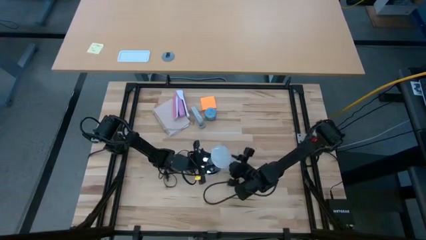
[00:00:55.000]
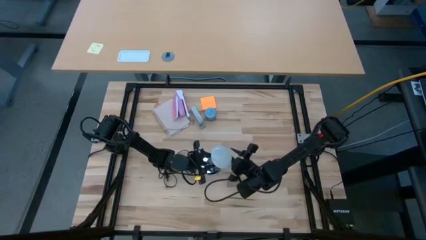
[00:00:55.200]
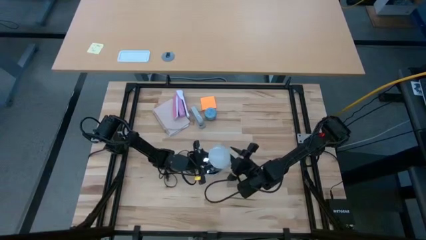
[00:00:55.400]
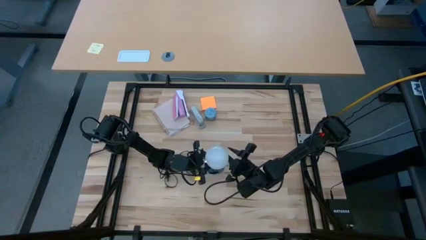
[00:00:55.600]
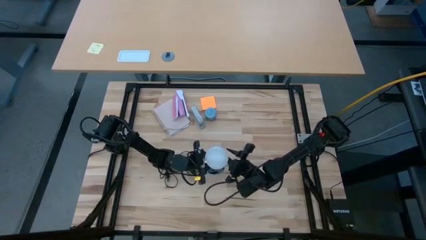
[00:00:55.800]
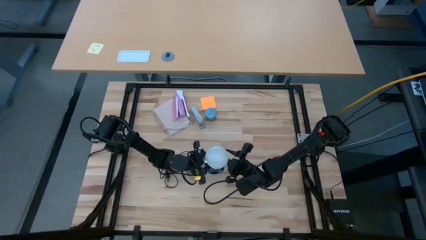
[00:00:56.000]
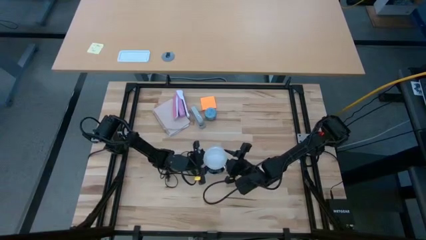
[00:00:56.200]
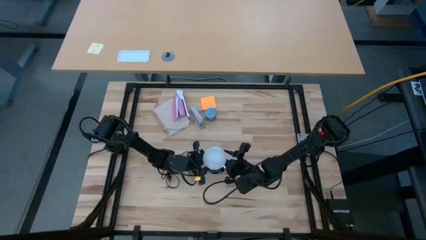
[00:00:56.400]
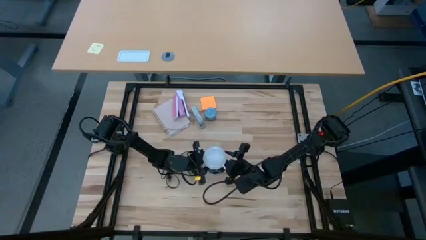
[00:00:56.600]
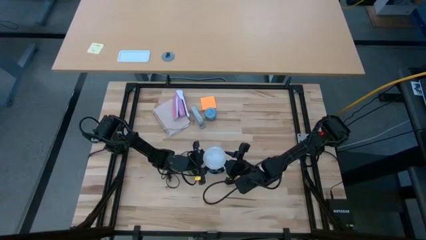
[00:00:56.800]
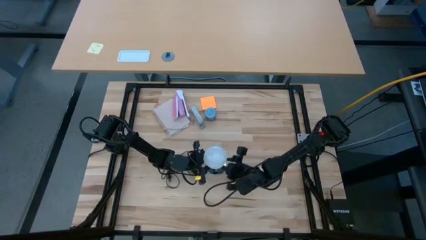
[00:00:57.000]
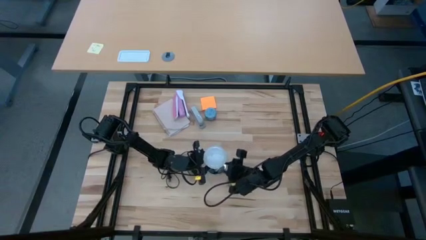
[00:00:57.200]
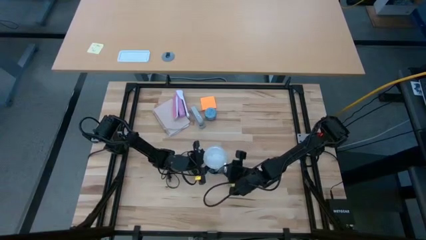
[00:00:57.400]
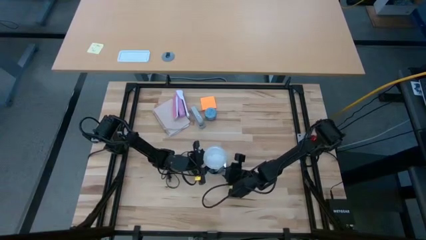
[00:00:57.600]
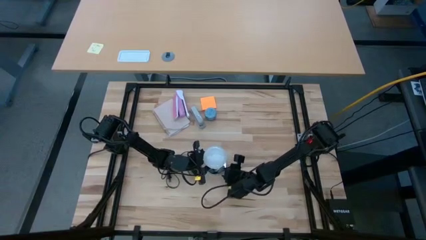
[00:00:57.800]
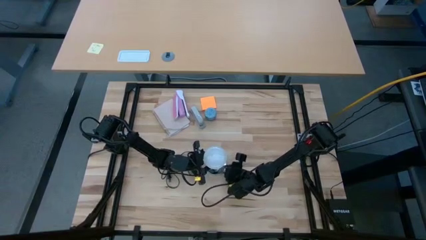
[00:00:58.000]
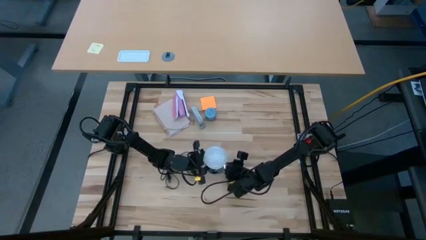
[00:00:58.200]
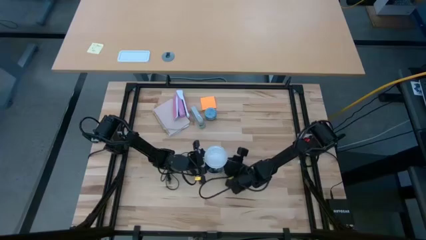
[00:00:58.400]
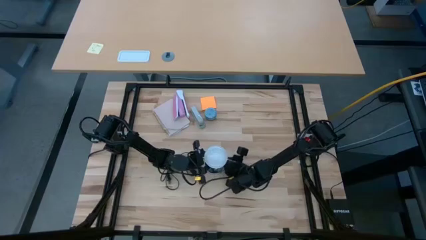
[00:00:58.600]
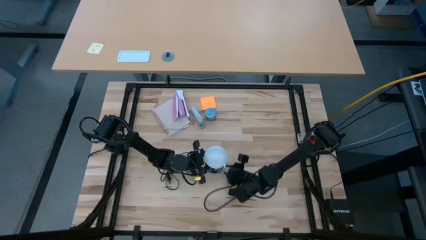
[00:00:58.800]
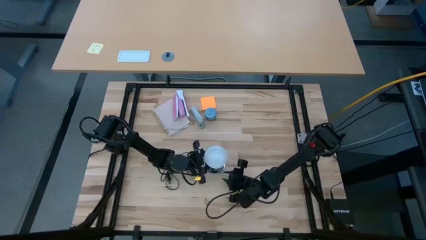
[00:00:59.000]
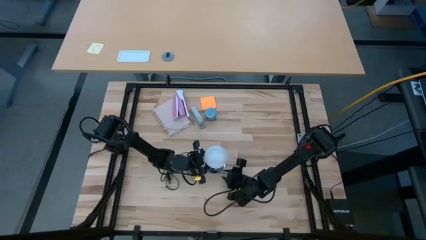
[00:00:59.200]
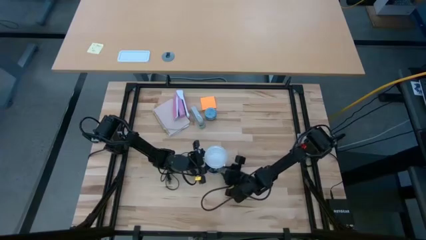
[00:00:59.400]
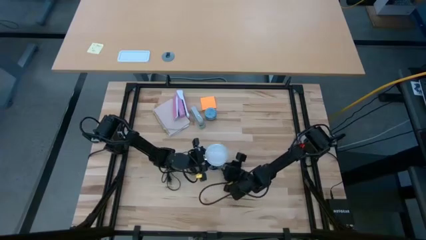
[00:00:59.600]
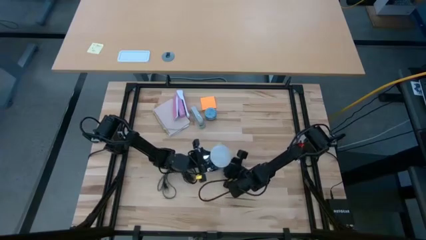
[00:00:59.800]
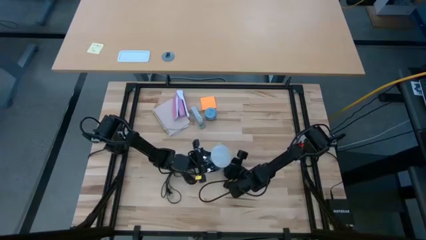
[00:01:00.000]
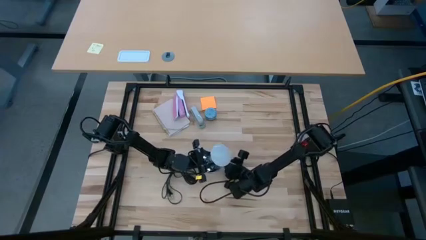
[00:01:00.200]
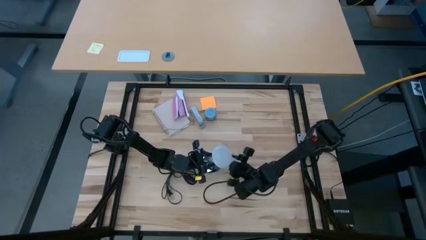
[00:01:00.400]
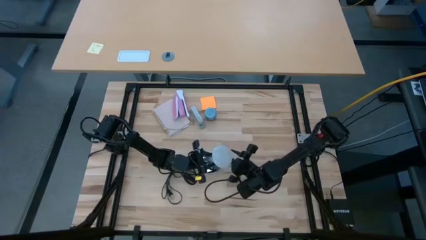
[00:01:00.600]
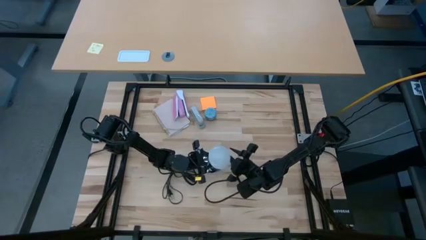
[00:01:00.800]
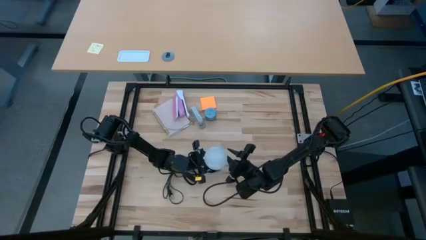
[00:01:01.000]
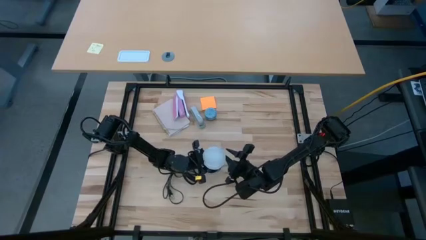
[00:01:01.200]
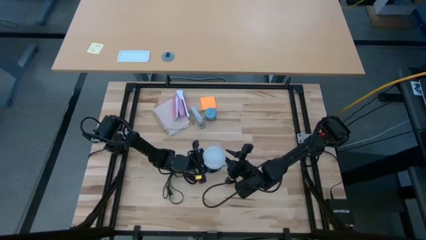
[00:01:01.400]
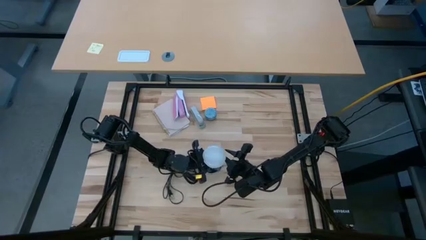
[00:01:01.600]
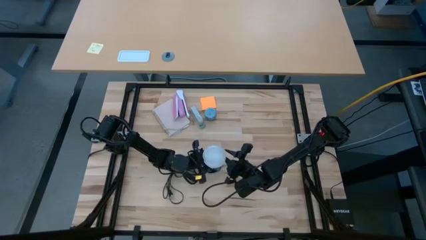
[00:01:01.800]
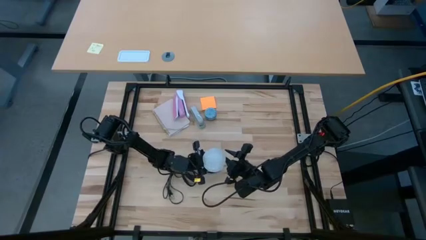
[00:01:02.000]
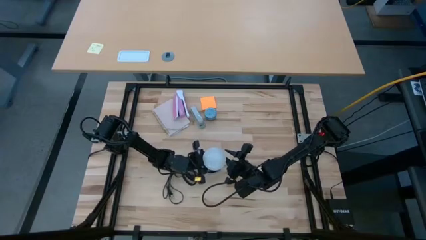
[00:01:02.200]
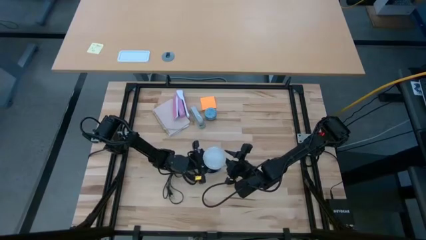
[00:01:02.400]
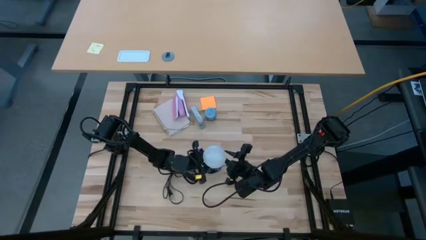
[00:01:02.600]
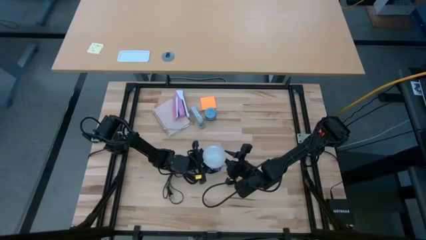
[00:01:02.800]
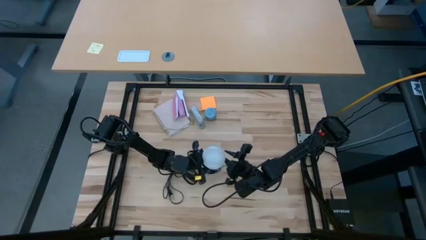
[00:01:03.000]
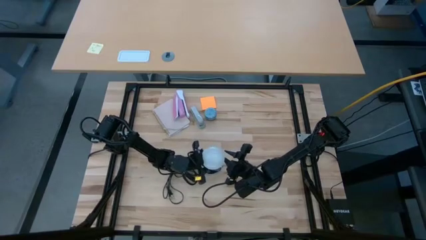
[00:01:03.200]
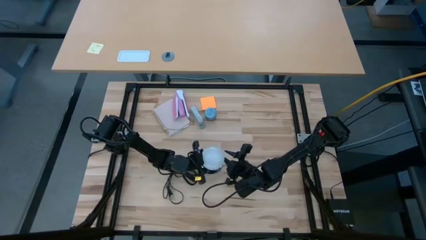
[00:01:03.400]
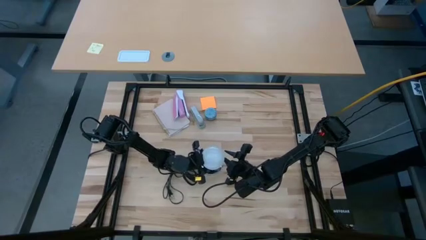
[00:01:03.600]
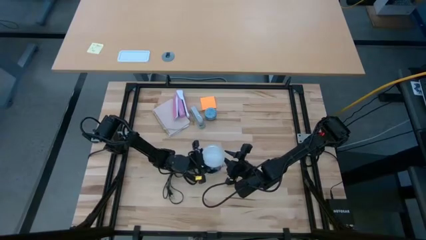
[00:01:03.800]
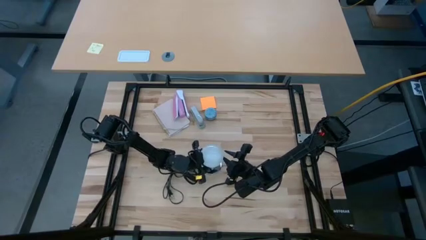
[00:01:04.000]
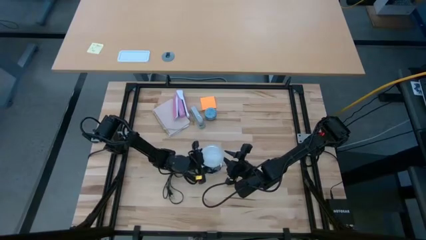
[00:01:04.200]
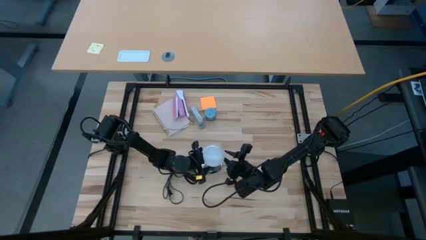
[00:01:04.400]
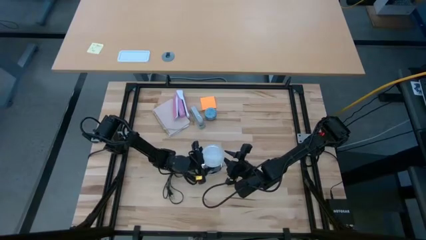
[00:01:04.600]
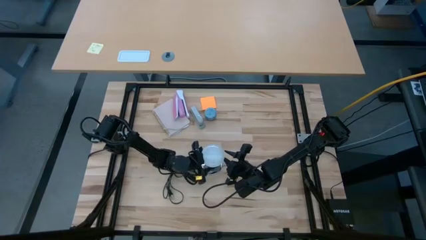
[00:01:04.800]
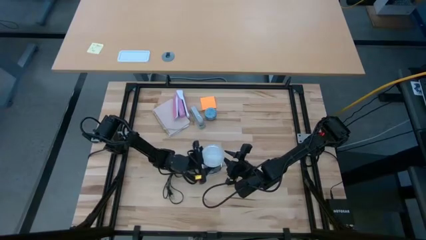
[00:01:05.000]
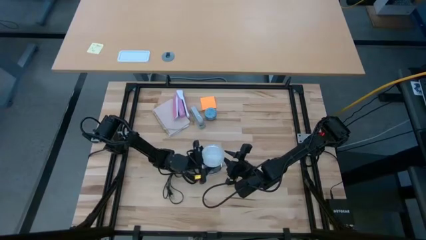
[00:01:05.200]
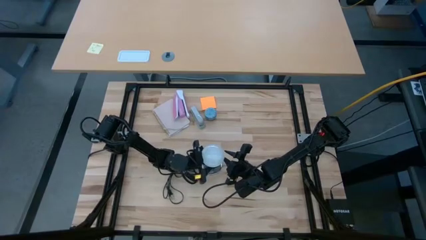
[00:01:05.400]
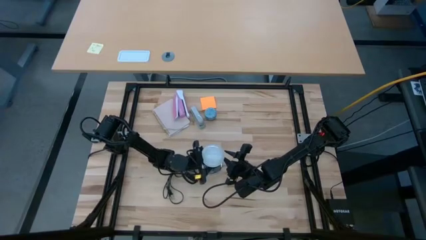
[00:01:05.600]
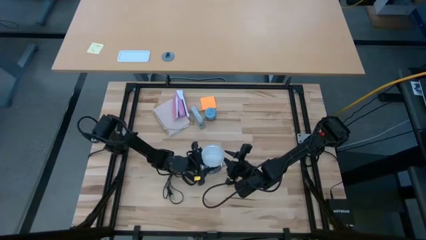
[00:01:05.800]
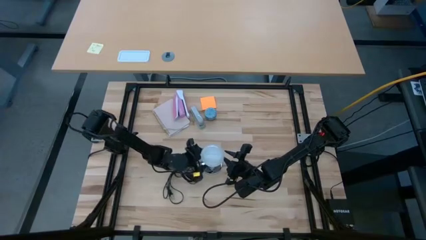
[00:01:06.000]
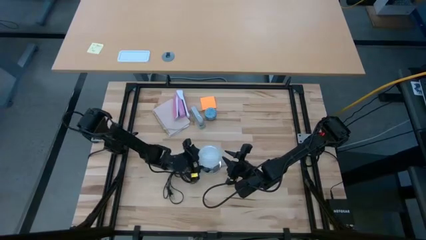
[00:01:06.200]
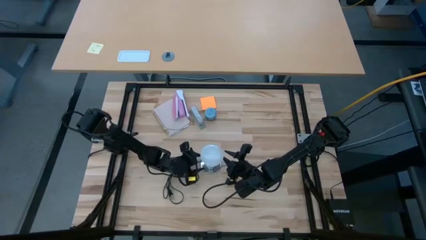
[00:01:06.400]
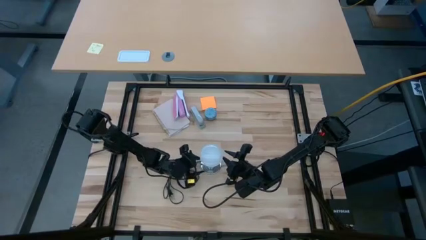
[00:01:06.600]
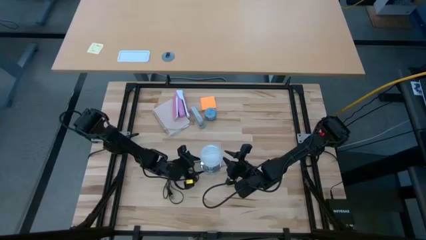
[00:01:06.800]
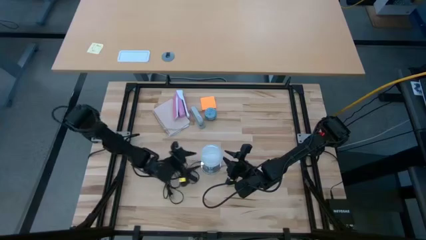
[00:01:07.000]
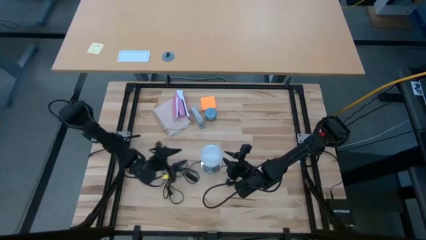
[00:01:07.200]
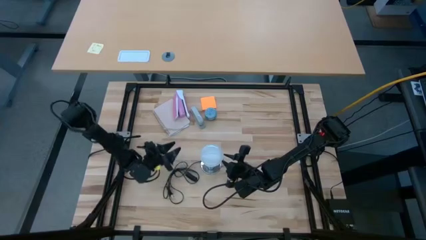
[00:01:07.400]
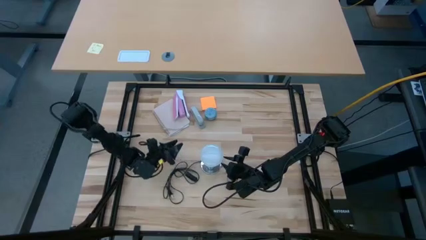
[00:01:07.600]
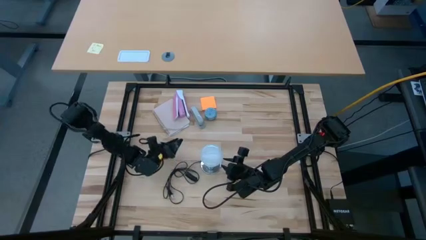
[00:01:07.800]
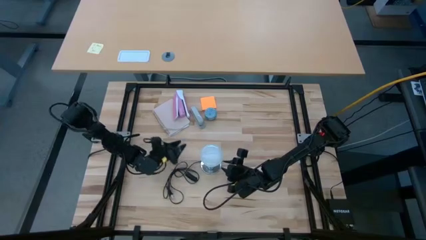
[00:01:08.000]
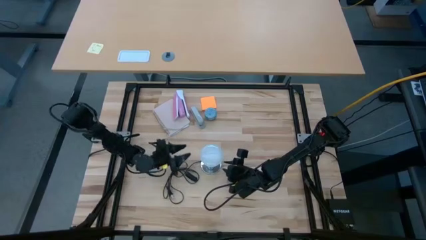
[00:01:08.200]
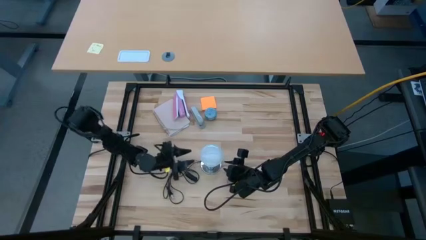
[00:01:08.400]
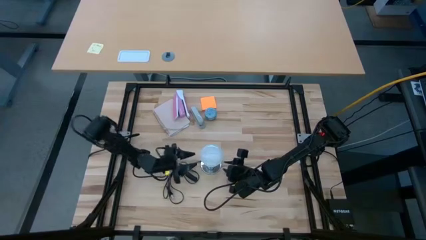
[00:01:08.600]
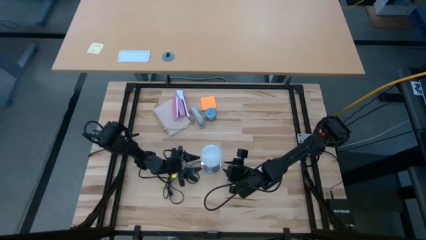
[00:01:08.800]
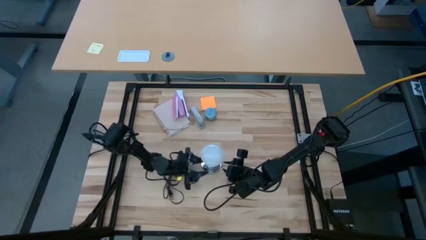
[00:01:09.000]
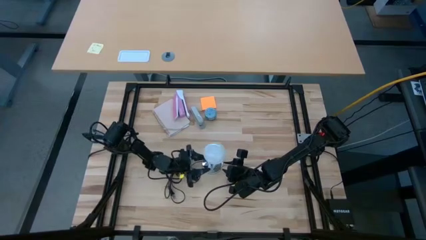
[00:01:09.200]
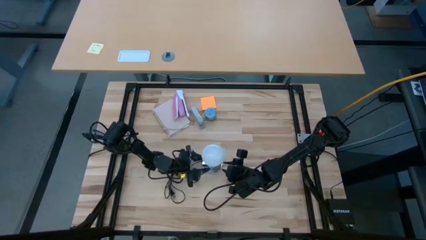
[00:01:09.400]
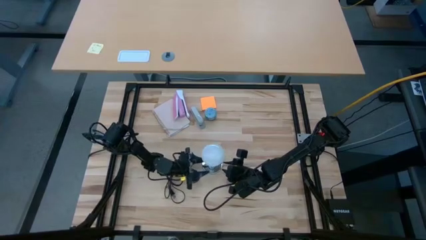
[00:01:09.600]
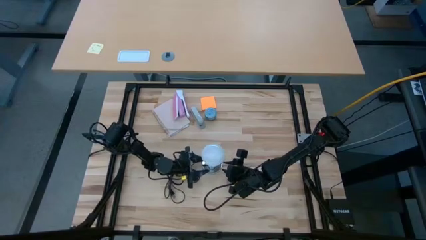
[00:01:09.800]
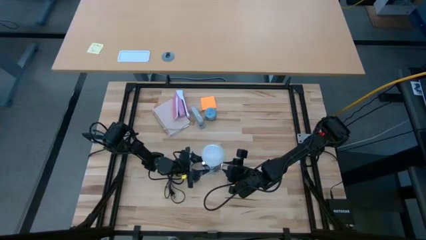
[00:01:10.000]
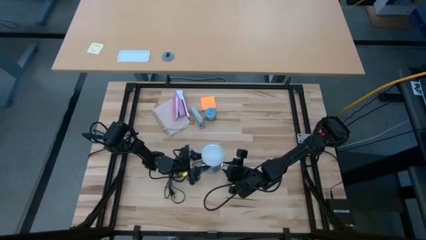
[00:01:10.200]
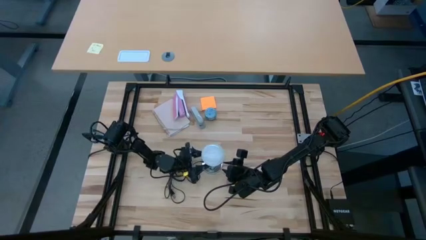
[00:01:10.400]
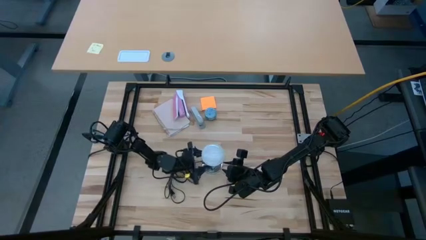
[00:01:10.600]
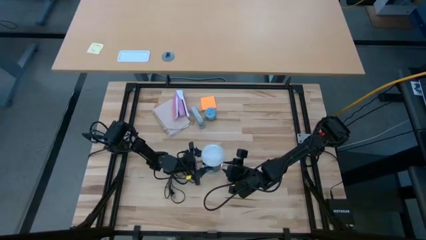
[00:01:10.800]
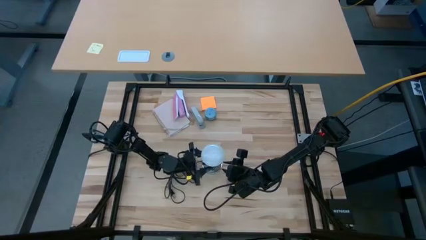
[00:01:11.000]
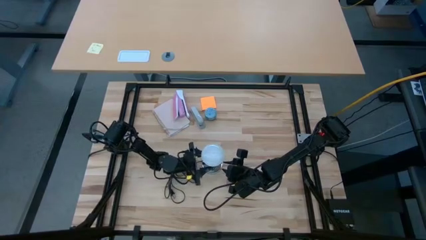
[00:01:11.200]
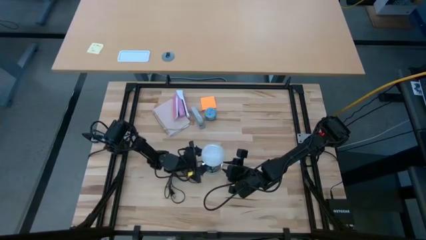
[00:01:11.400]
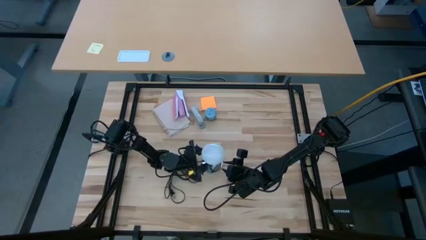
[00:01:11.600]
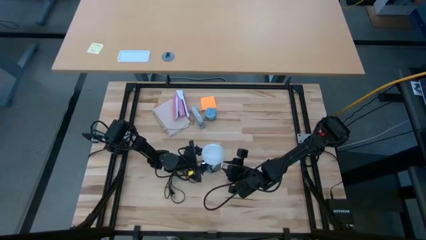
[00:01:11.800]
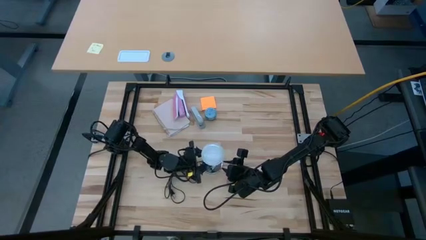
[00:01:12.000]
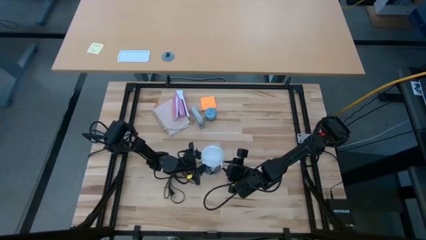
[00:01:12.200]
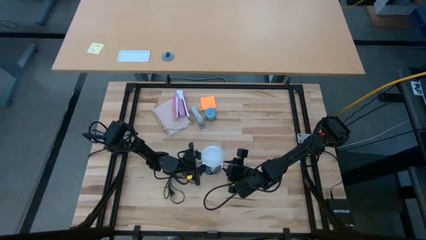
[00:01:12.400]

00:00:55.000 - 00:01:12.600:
Task: Screw lightbulb
Insert the white lightbulb into the silver lamp
